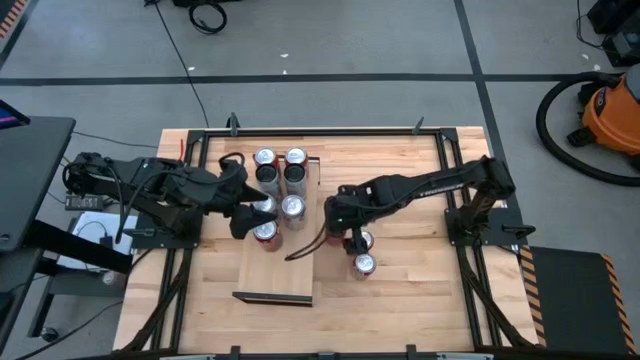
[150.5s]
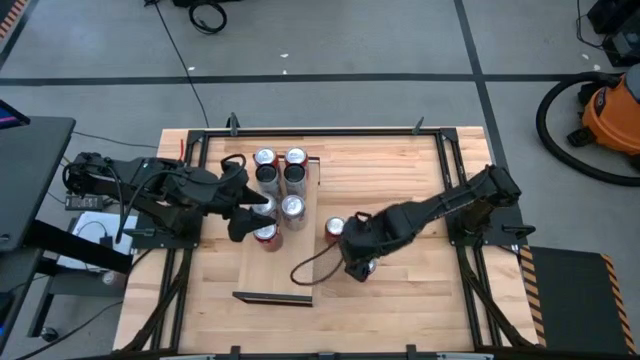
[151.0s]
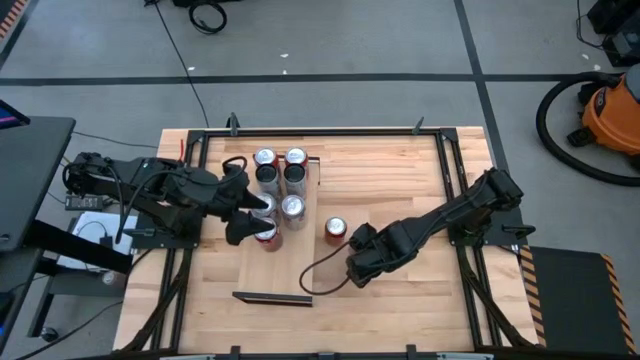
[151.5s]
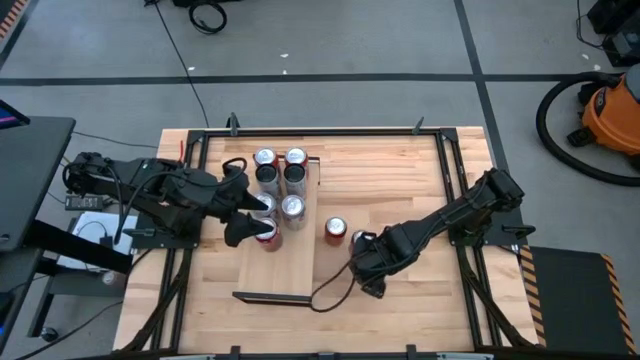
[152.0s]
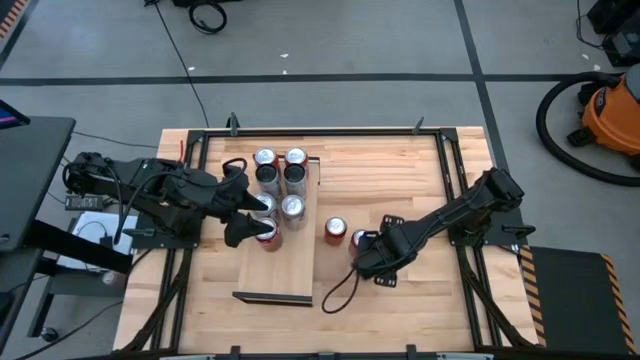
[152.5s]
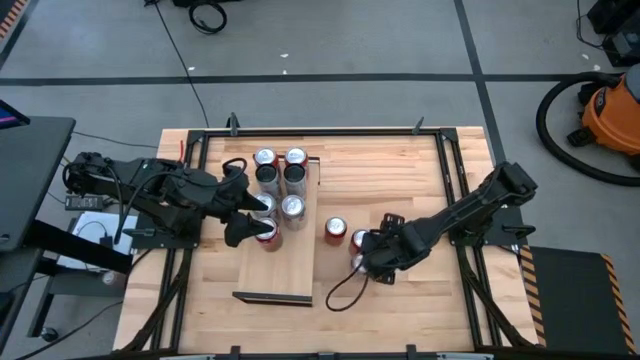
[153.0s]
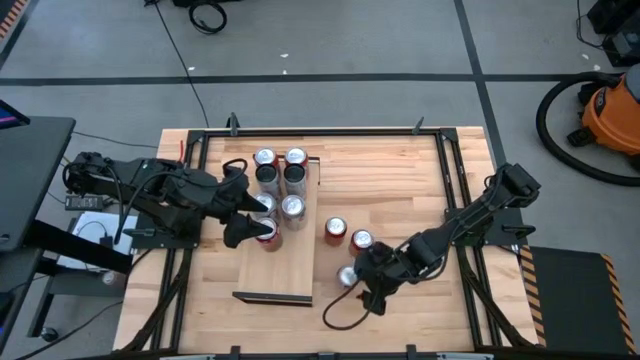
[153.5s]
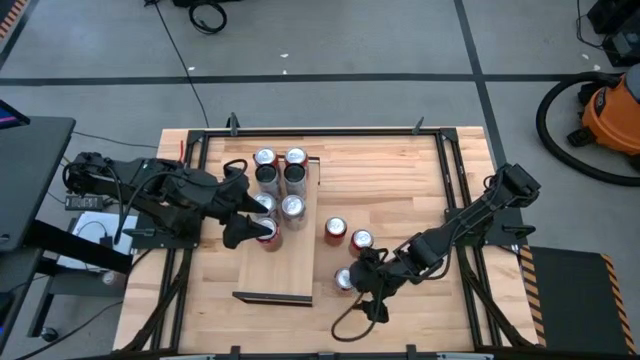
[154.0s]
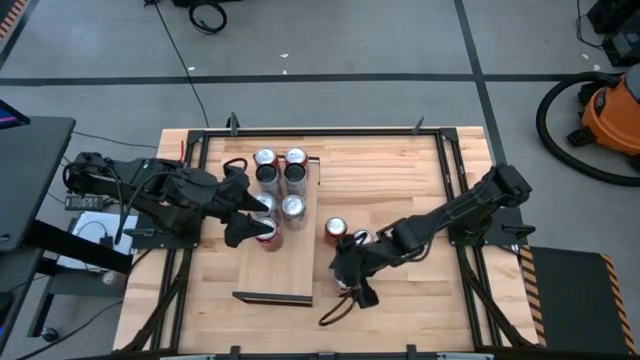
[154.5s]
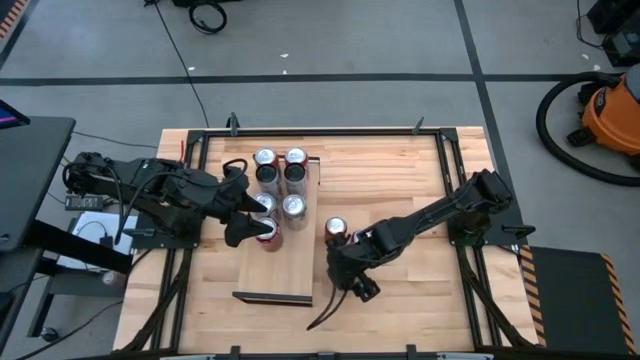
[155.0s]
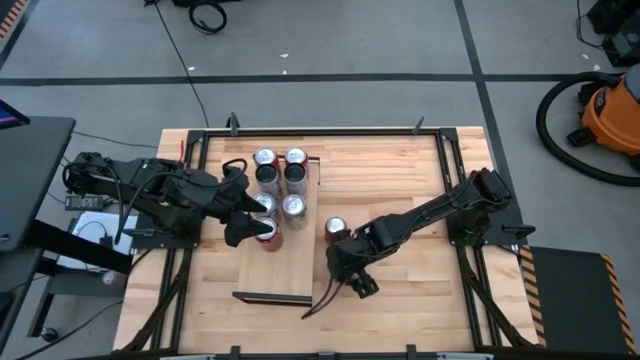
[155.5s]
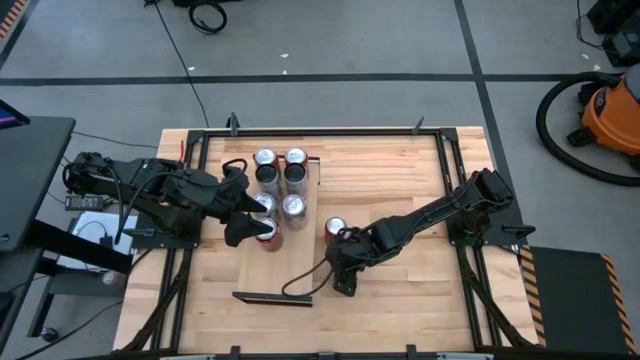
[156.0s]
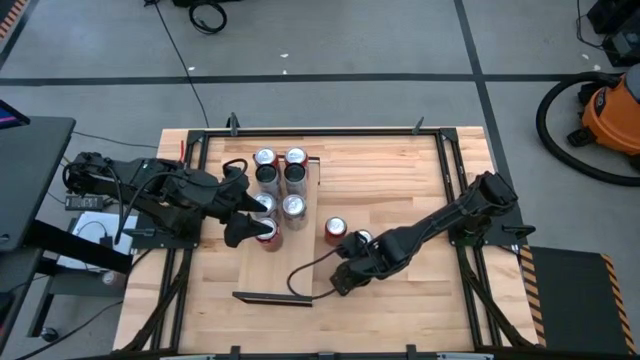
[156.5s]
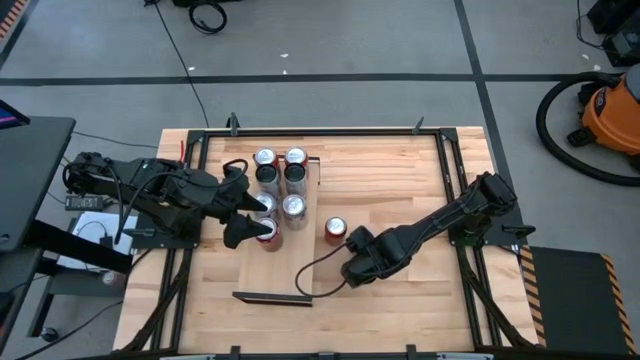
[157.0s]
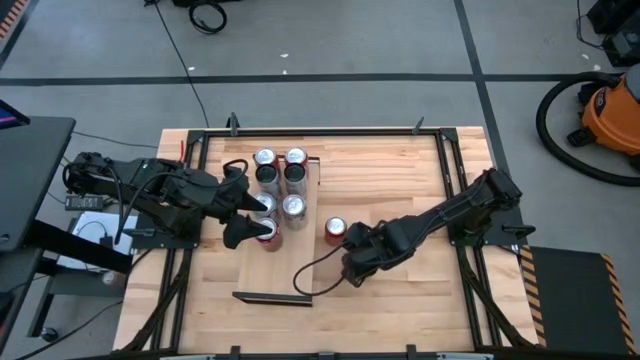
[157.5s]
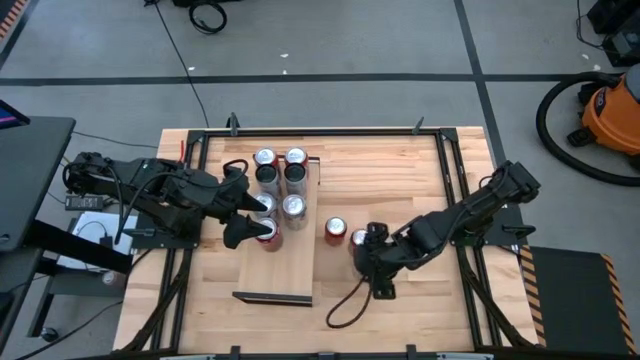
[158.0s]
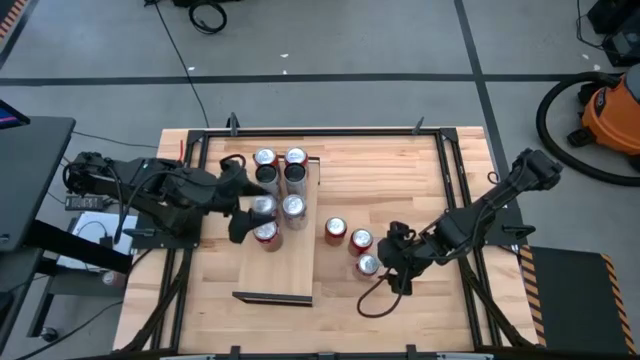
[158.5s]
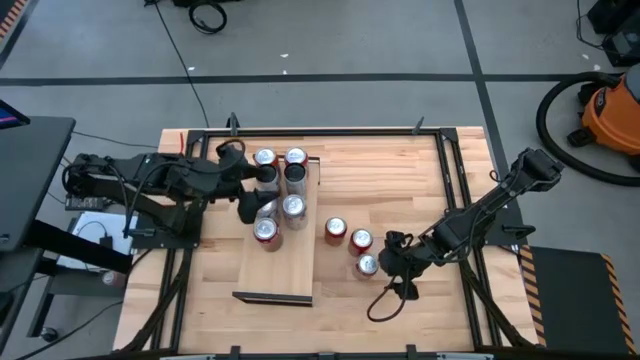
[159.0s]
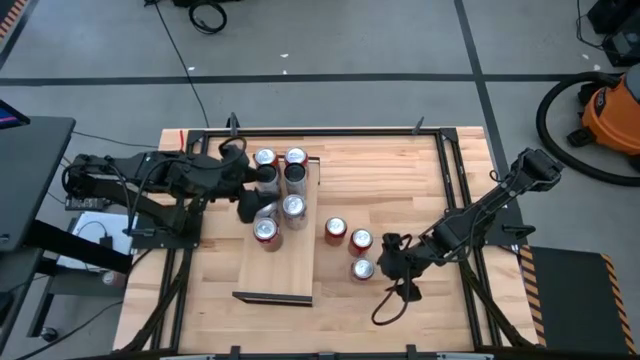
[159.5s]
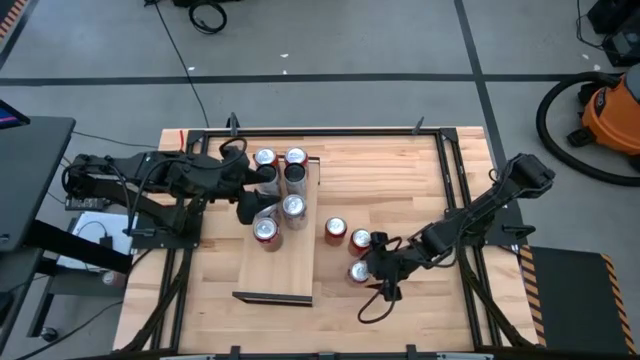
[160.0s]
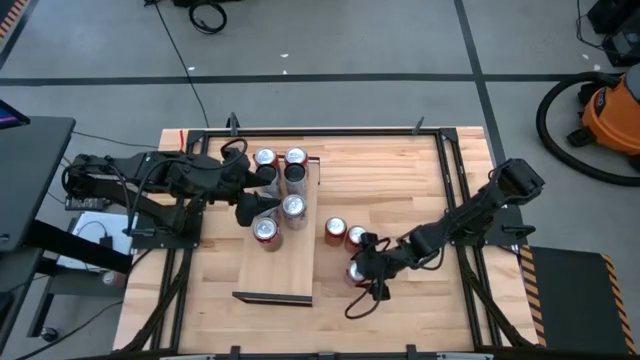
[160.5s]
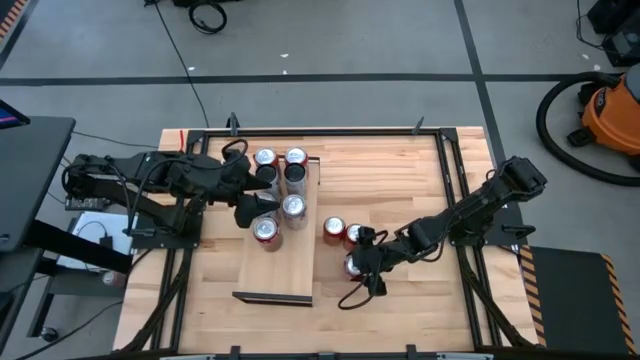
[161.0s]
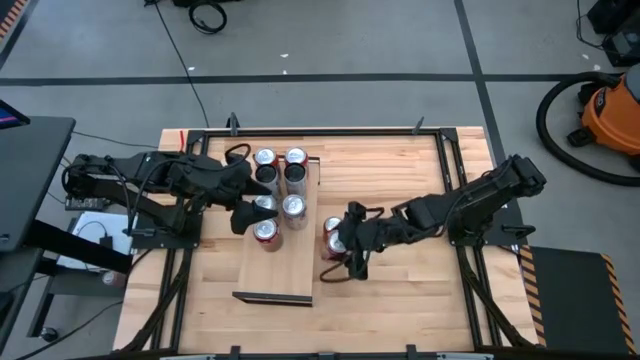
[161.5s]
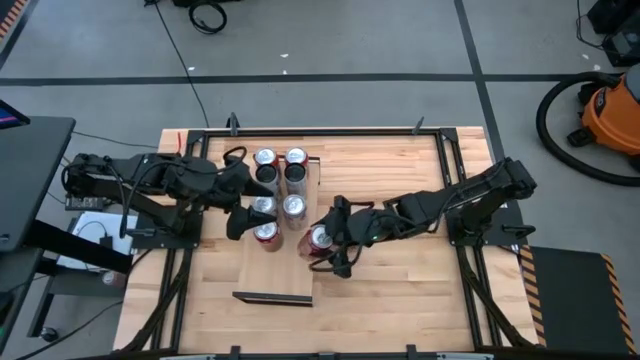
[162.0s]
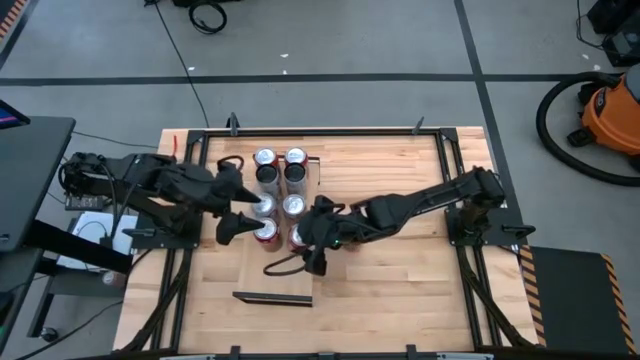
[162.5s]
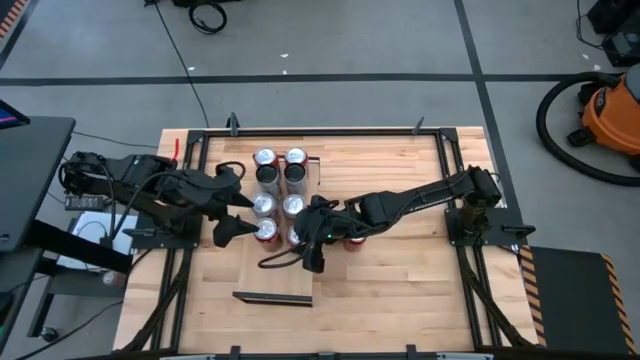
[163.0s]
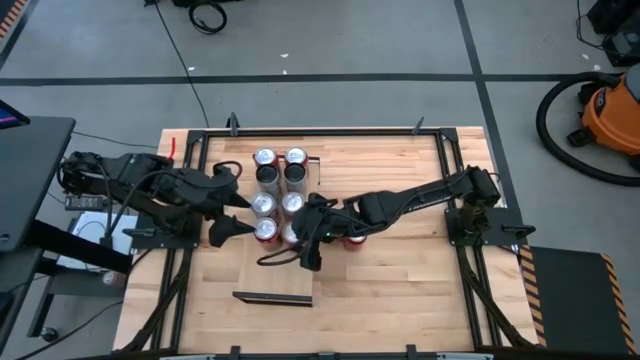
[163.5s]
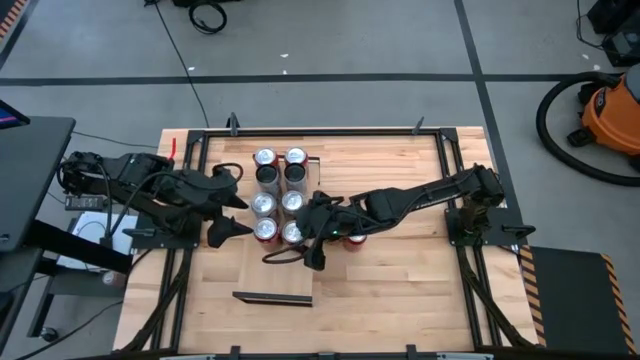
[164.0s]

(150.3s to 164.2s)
Task: Place canned beverage on shelf
Put the red and white soda can aligned with the other red and white soda can on the shelf

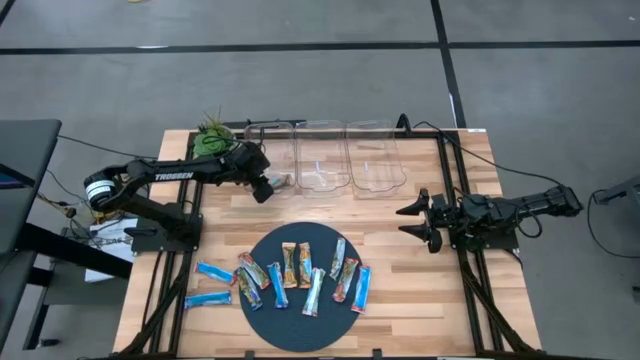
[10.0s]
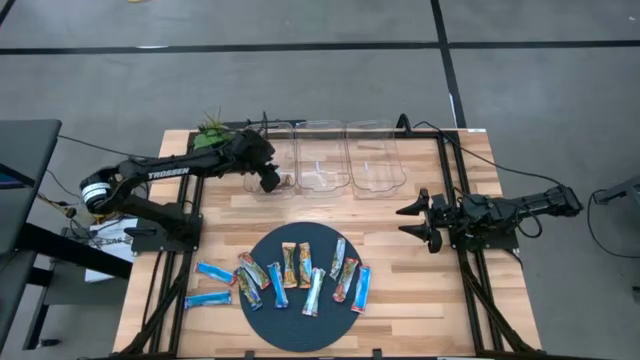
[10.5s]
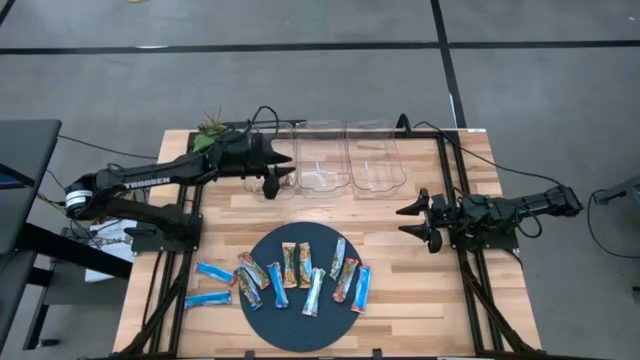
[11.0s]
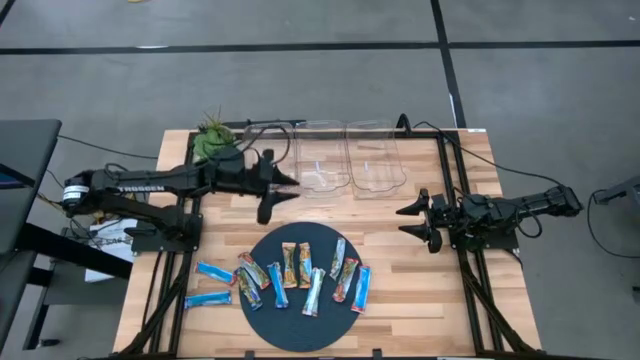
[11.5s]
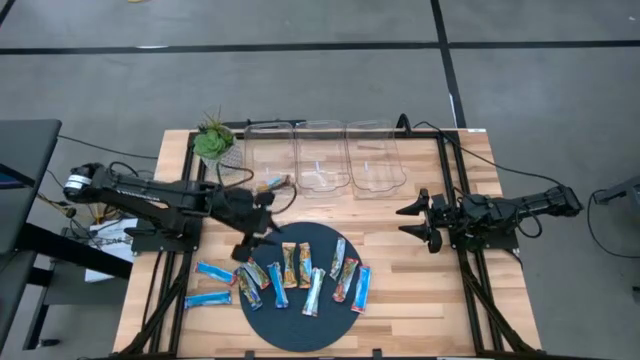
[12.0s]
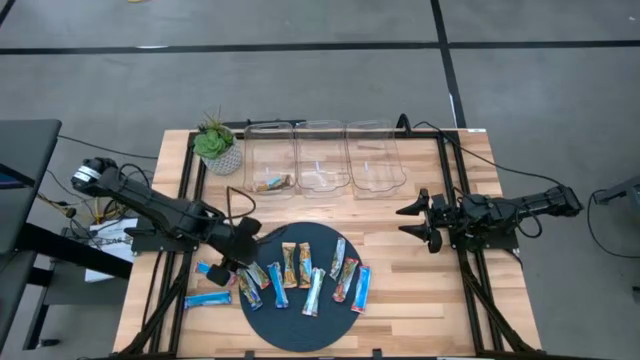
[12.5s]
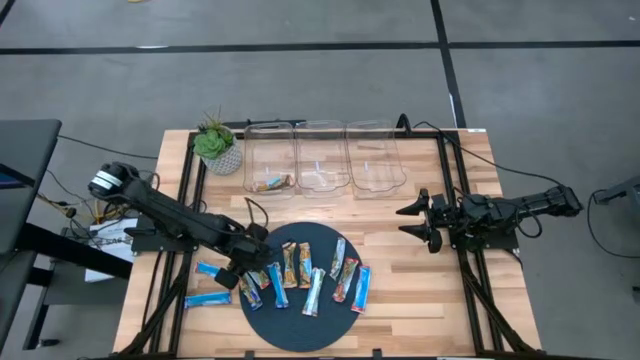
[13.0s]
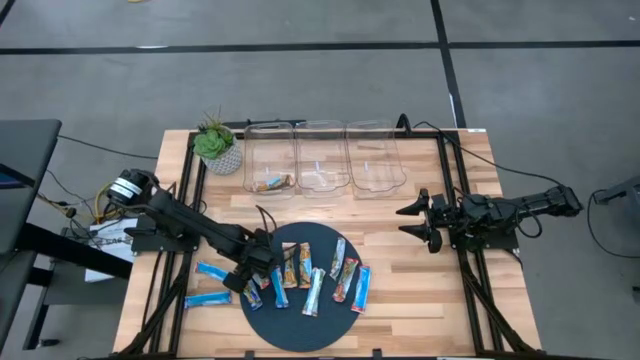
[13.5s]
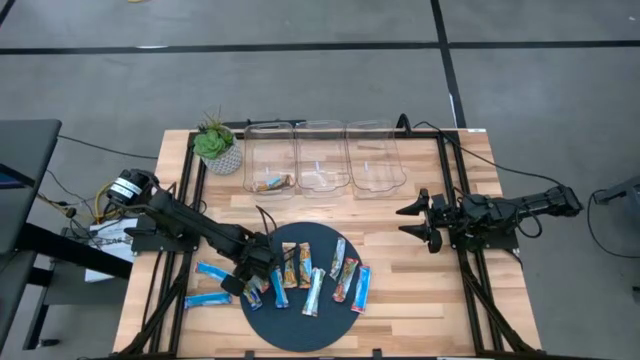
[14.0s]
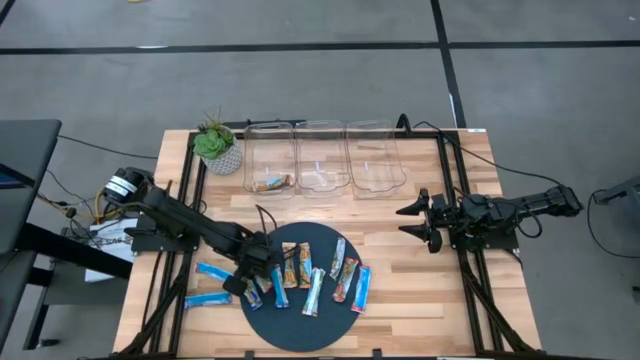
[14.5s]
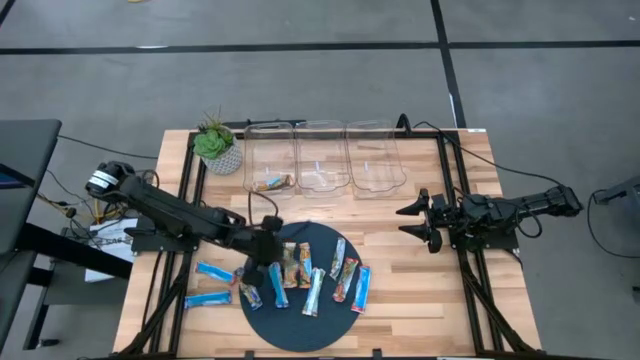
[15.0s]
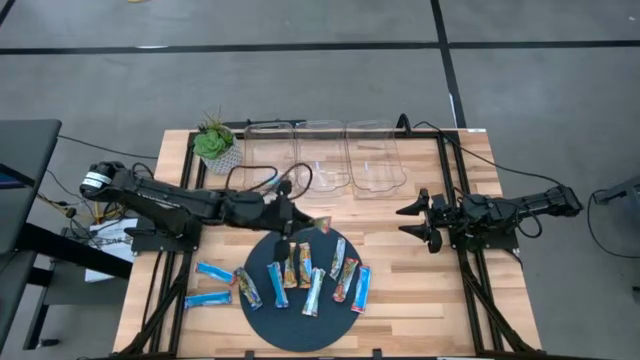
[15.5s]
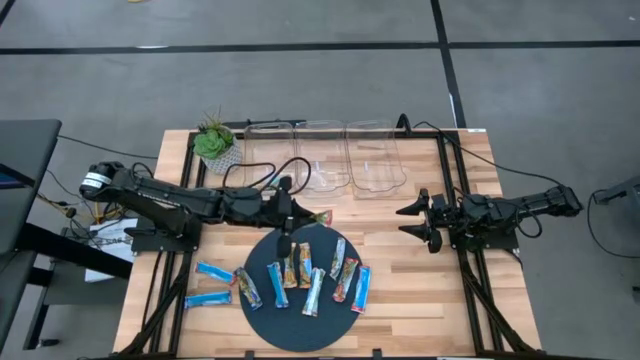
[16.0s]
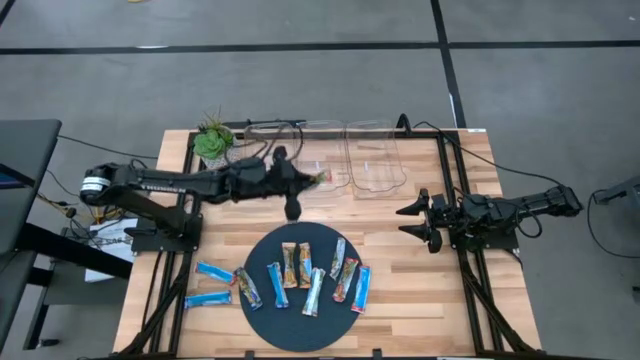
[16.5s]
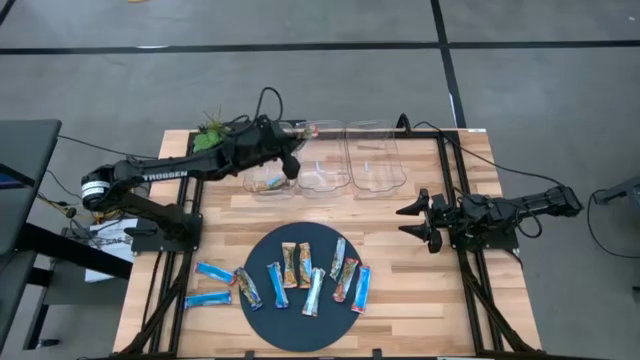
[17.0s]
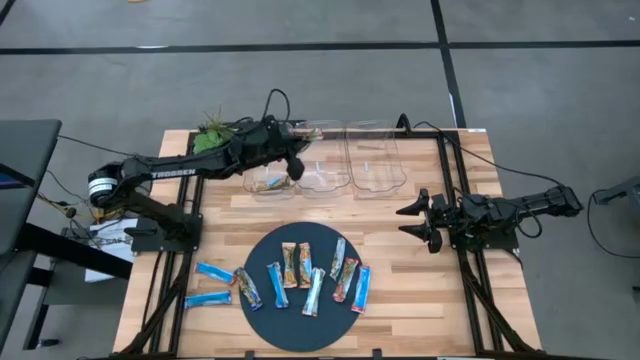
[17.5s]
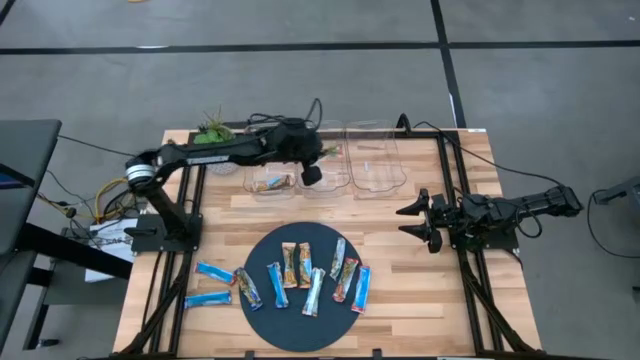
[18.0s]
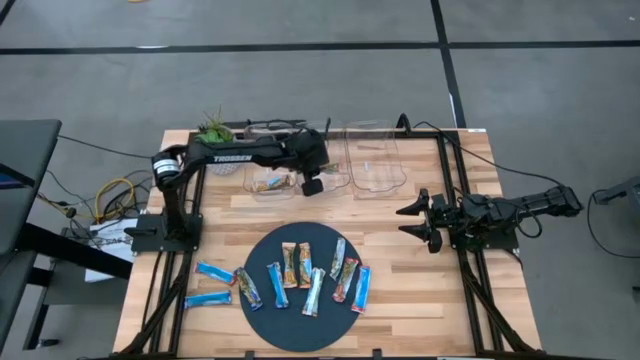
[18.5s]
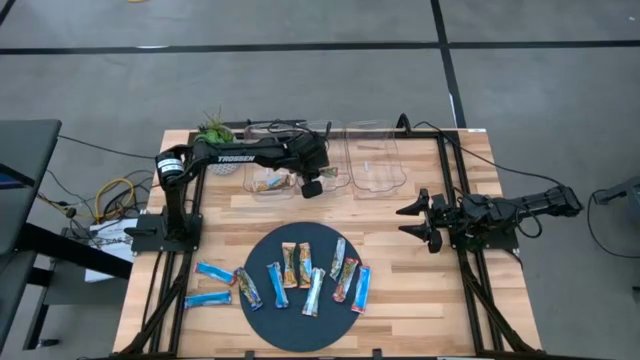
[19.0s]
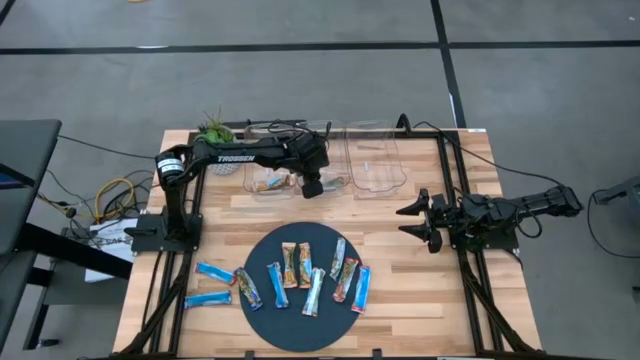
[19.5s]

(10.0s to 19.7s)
Task: Pick and place Granola Bars by type
Put the red bar into the center transparent bin
